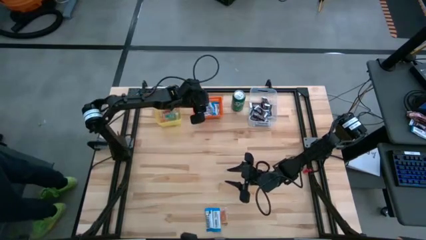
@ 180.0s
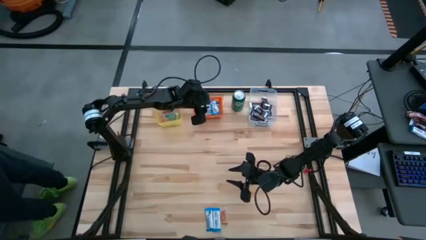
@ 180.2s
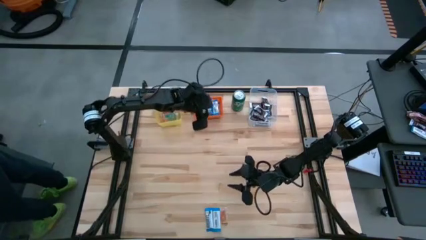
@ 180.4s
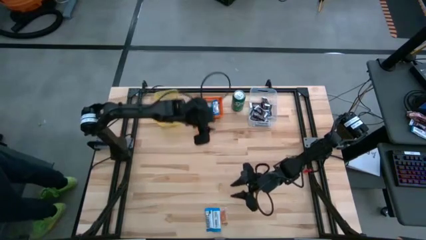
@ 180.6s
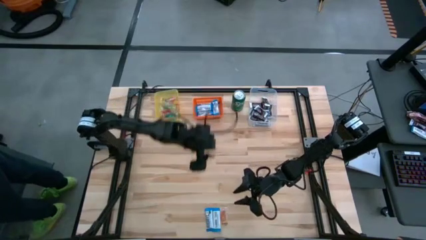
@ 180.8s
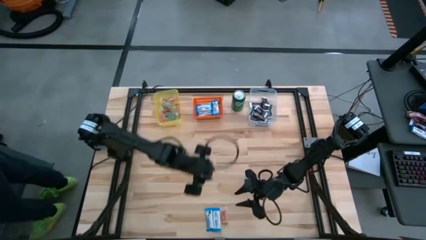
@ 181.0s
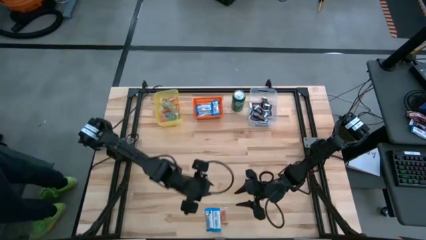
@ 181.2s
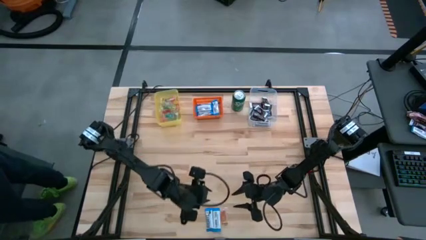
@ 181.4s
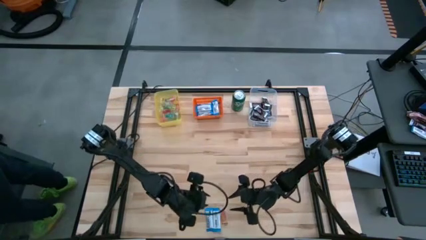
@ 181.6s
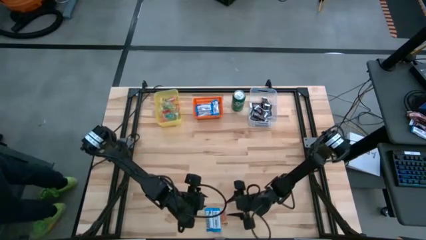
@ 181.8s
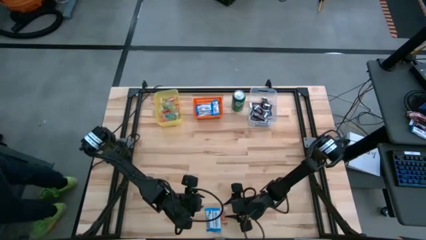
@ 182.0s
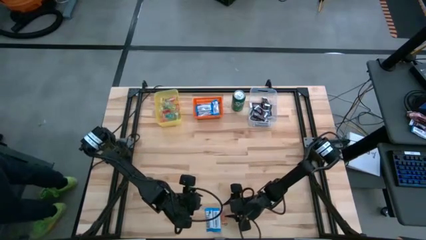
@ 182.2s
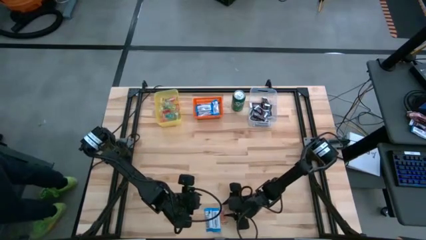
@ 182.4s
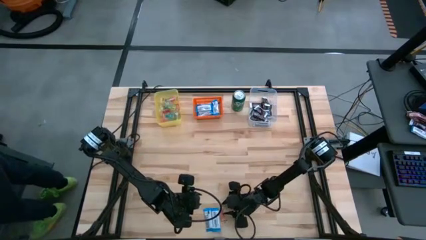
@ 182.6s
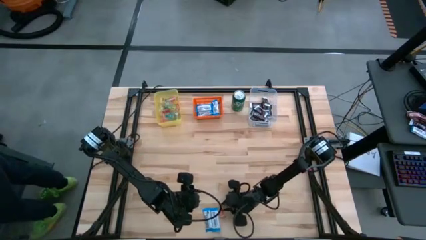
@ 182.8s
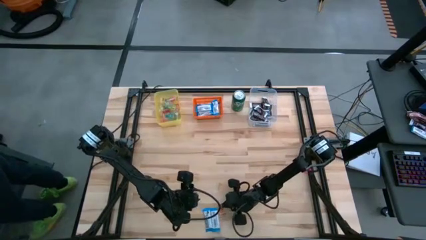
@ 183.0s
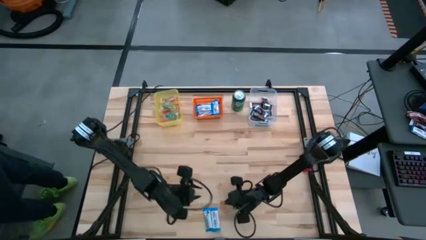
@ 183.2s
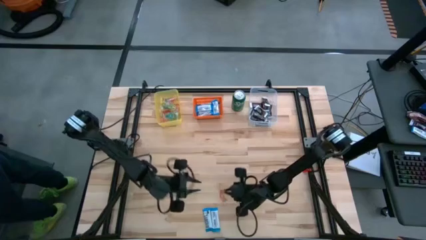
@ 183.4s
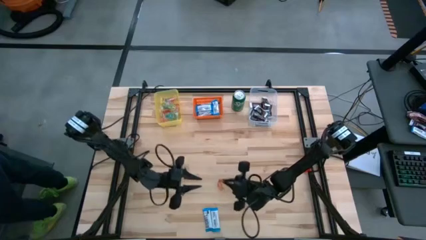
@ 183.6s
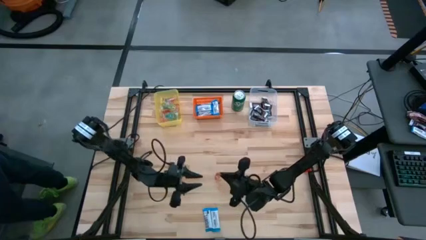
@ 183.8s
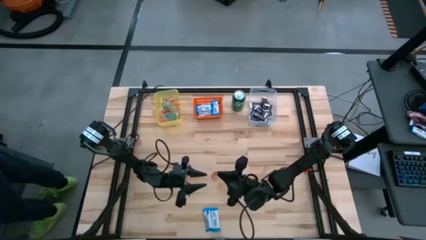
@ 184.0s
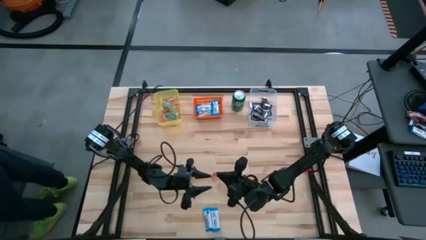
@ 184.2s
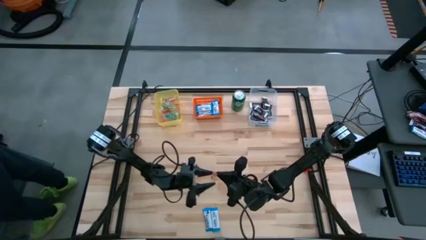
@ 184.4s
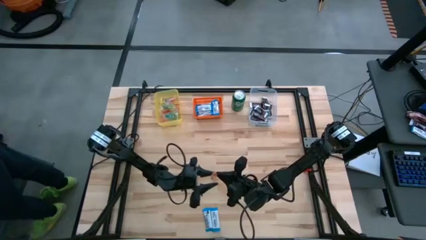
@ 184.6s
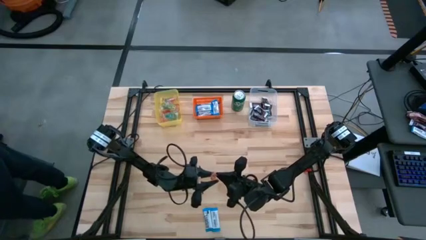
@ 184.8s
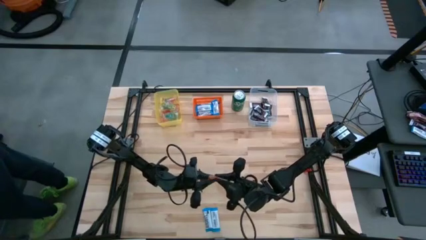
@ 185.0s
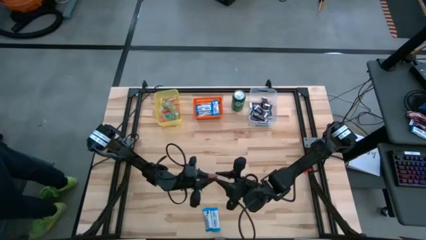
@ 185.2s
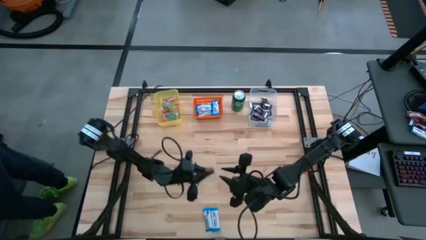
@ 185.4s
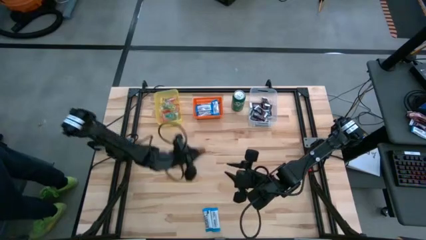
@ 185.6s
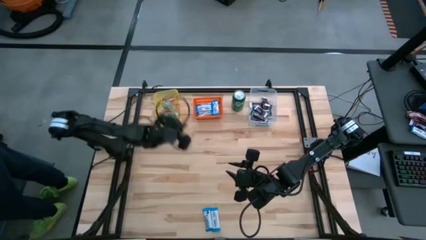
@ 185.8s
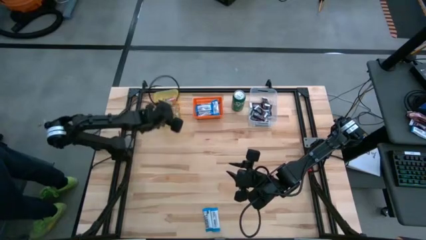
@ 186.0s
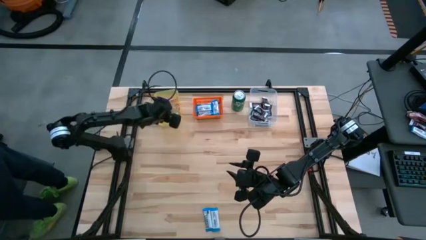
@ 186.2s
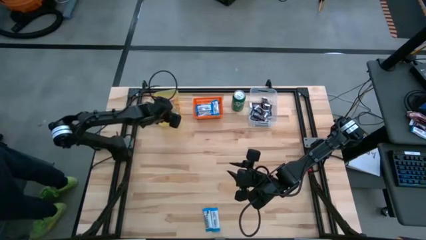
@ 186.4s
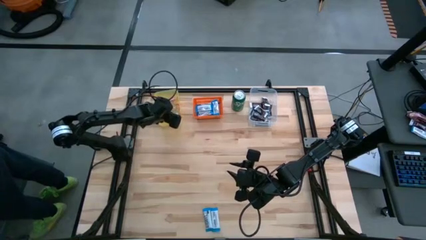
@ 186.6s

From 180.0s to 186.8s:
Task: Organize candy in baskets
Put the orange gummy into the yellow bin

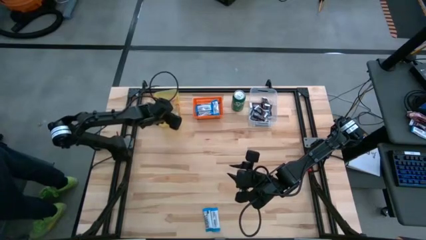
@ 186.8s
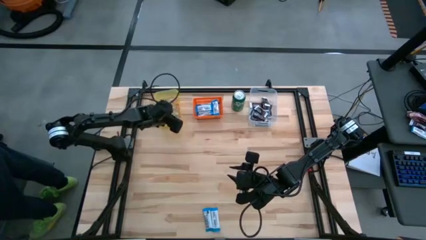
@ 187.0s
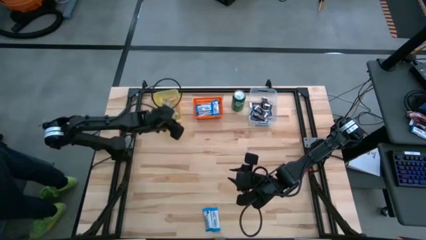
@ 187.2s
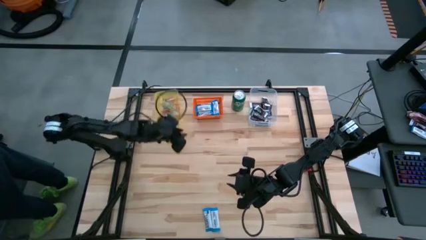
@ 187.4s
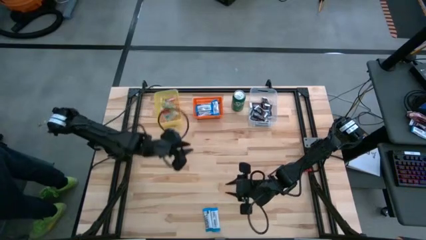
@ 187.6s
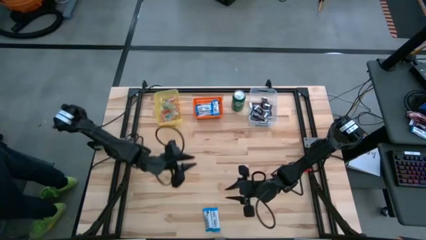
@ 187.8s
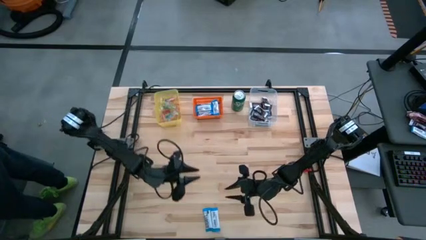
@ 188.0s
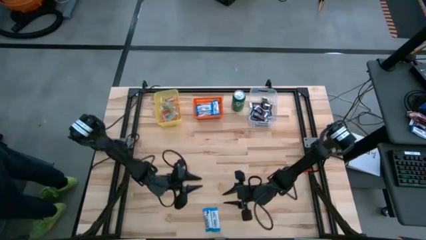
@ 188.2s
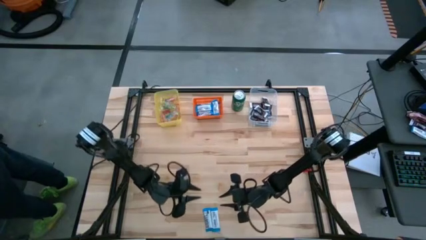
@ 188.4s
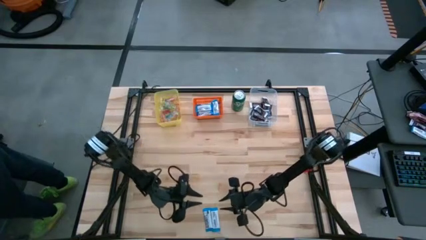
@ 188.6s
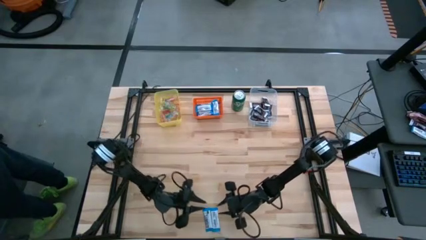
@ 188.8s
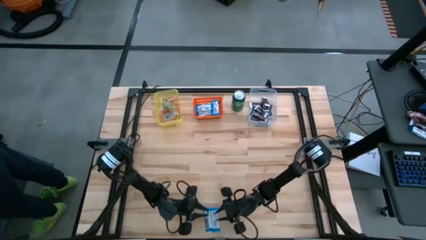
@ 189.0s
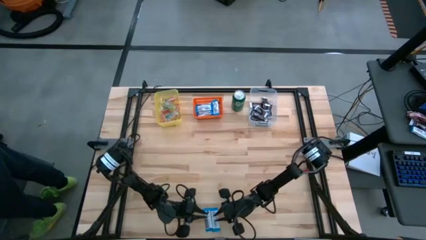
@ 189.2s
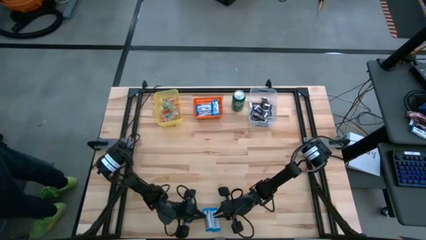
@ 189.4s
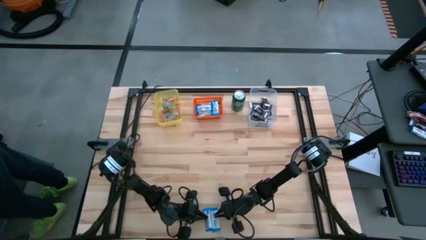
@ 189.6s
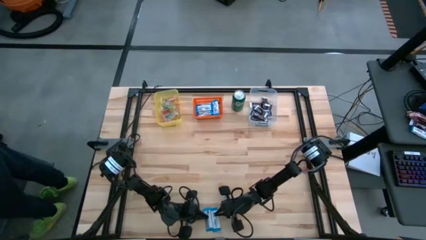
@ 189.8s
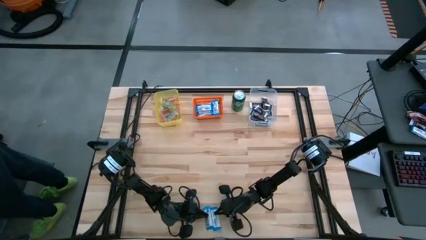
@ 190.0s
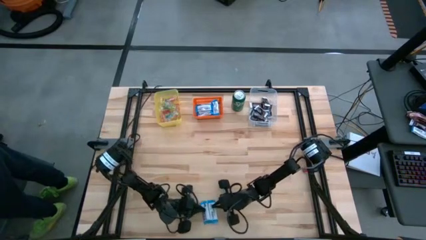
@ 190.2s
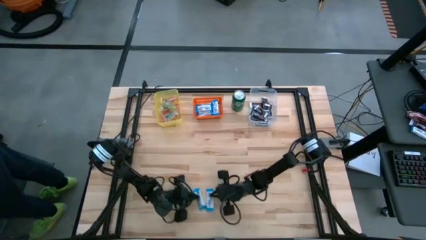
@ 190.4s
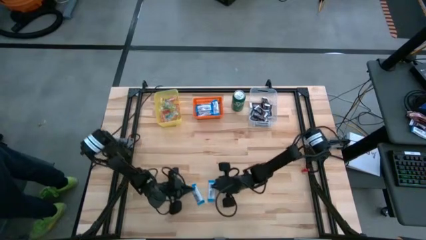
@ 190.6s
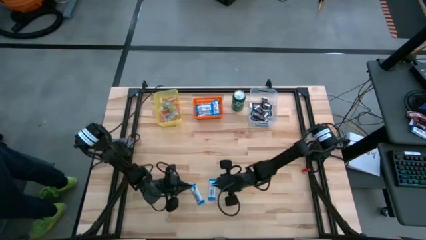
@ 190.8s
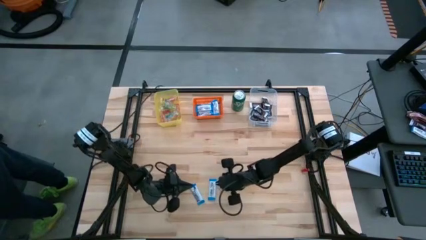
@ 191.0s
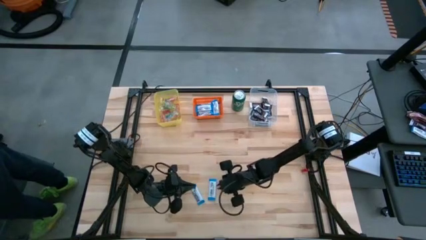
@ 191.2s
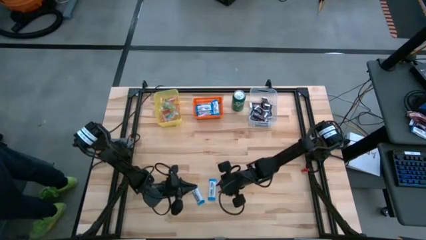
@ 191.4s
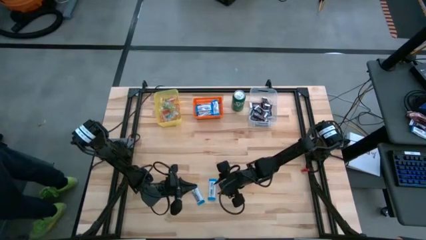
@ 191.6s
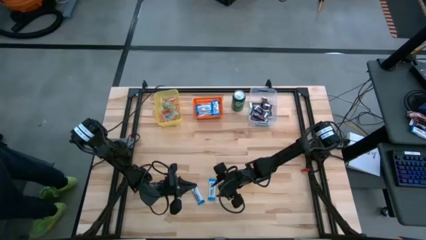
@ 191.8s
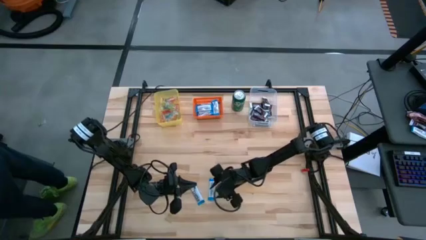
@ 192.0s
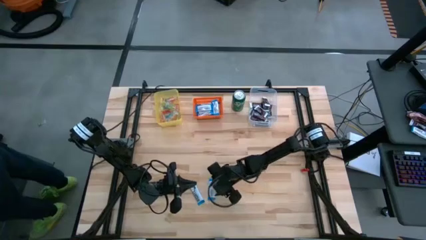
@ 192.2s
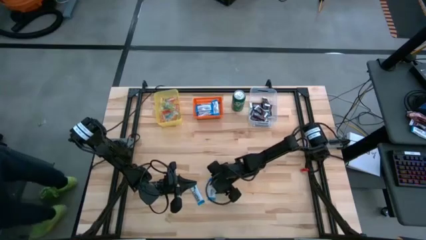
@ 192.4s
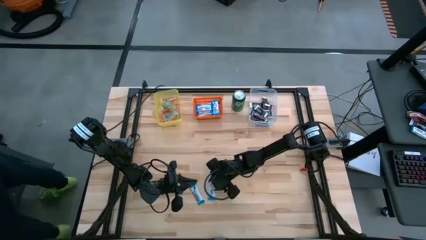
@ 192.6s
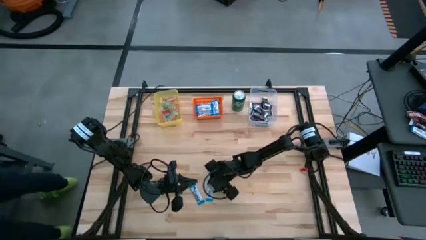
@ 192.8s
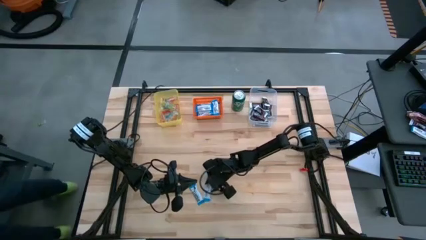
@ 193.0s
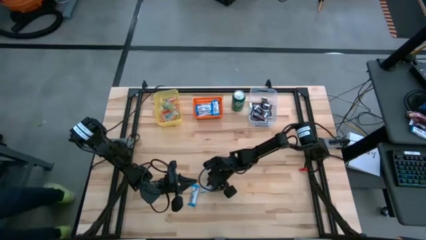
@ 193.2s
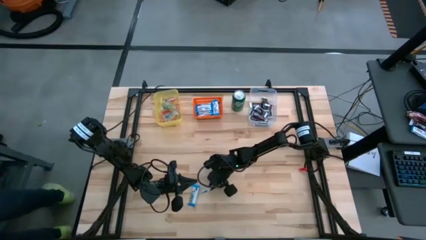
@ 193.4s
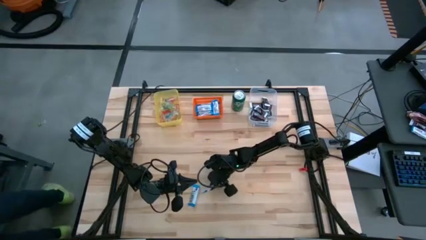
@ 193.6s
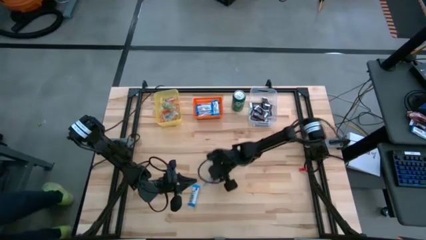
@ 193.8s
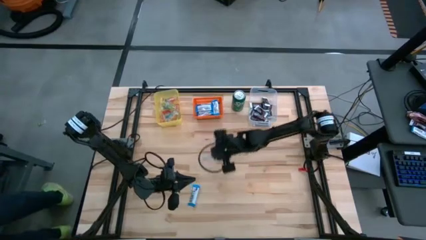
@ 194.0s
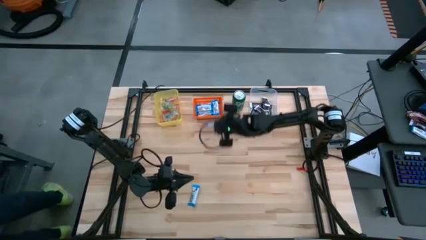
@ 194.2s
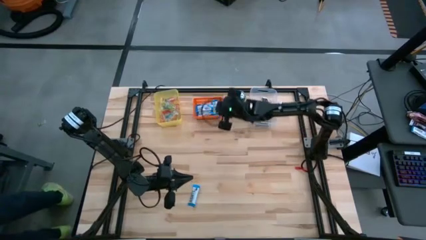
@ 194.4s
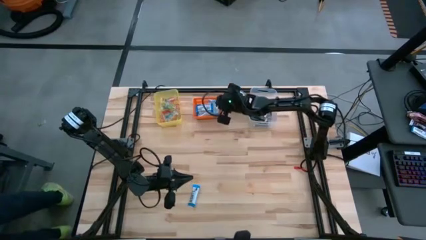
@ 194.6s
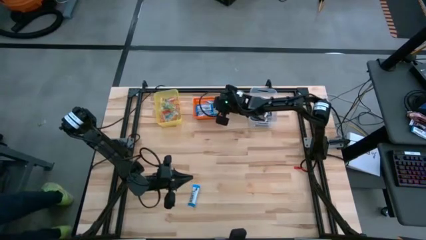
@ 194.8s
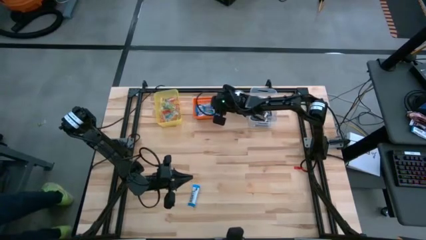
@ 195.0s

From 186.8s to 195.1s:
Put the white chocolate into the orange bin
